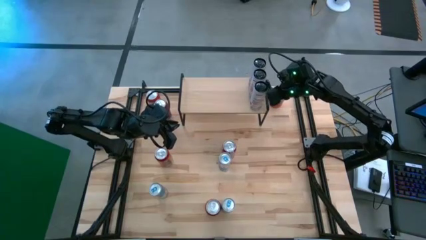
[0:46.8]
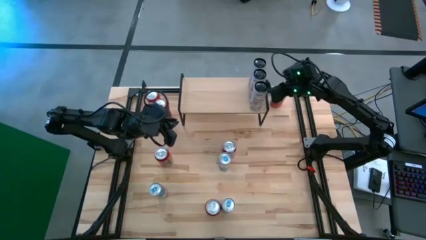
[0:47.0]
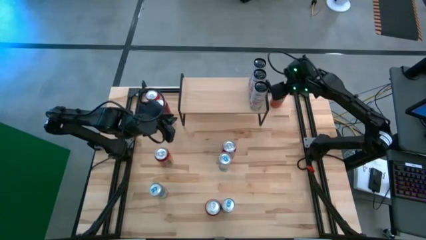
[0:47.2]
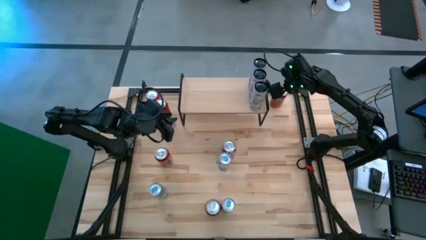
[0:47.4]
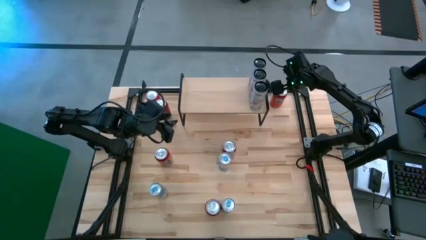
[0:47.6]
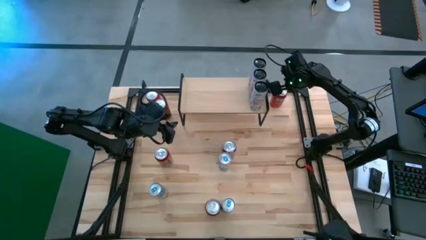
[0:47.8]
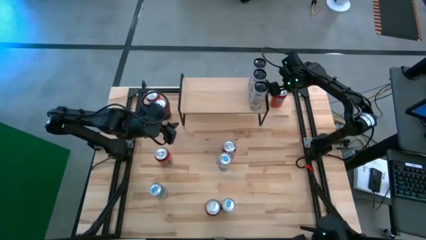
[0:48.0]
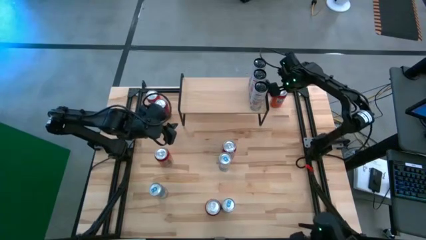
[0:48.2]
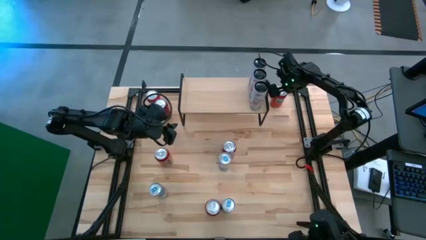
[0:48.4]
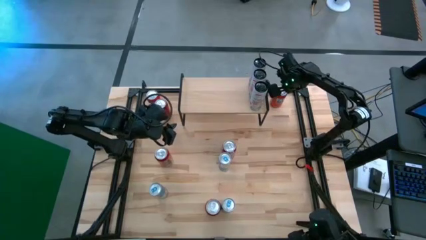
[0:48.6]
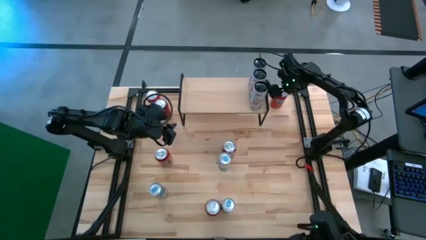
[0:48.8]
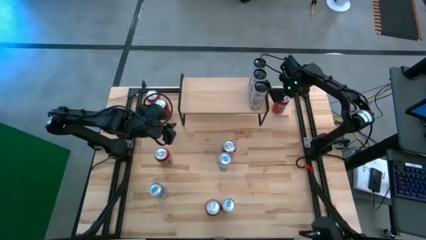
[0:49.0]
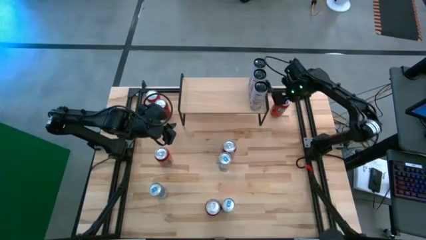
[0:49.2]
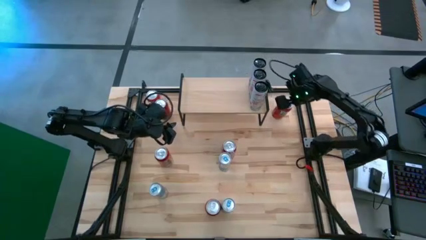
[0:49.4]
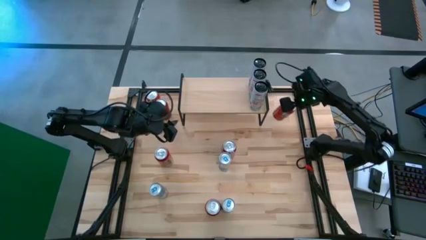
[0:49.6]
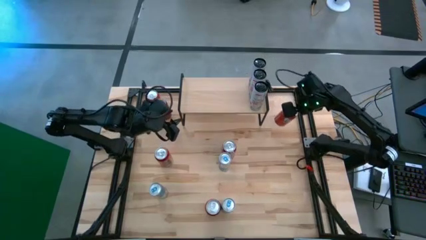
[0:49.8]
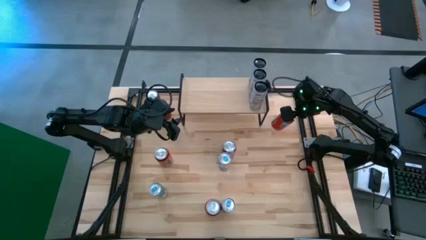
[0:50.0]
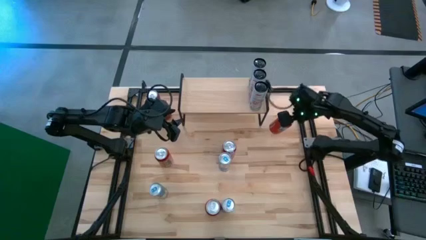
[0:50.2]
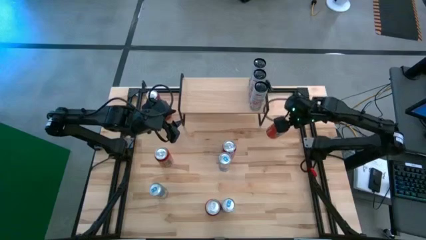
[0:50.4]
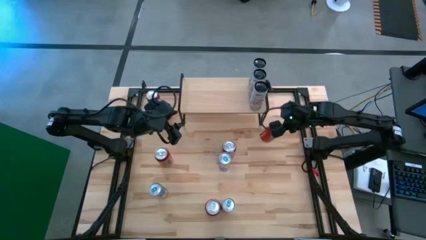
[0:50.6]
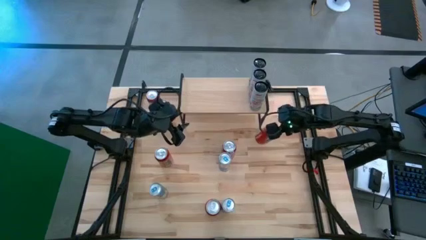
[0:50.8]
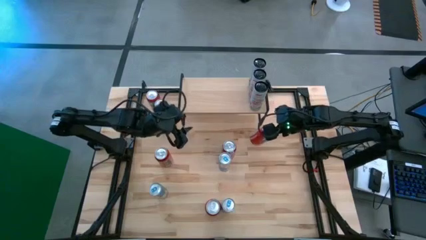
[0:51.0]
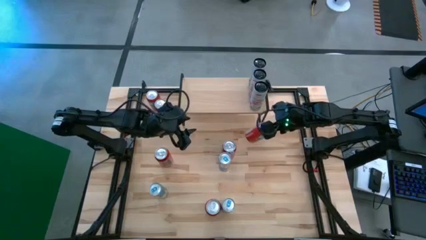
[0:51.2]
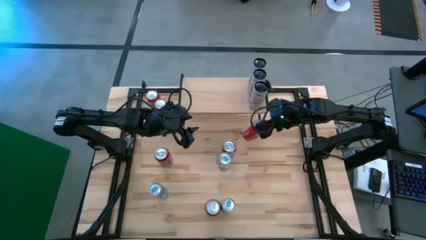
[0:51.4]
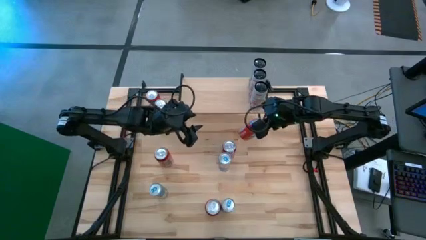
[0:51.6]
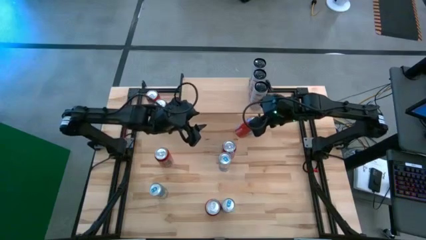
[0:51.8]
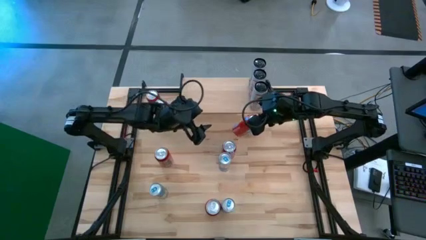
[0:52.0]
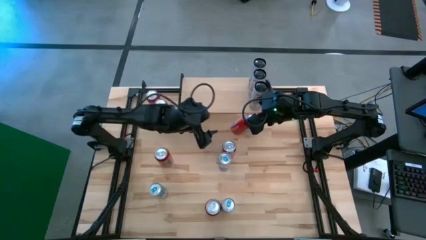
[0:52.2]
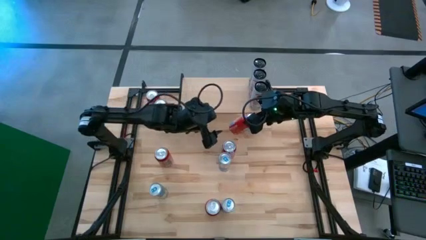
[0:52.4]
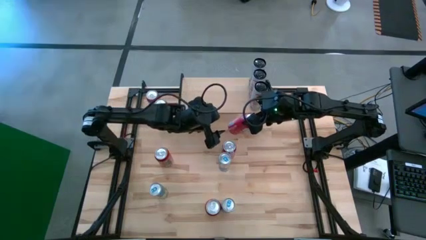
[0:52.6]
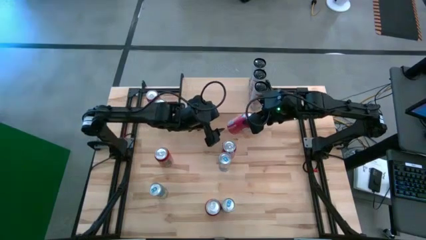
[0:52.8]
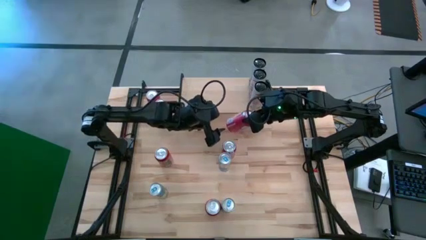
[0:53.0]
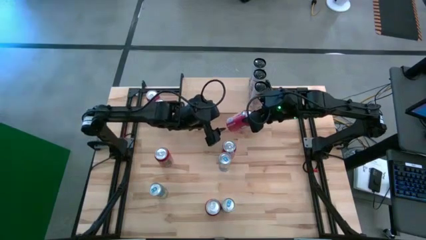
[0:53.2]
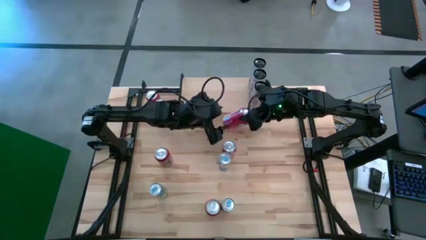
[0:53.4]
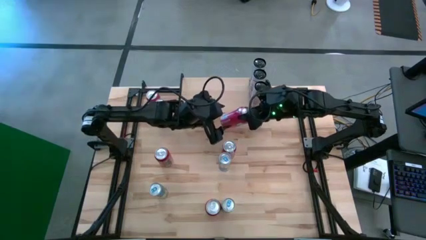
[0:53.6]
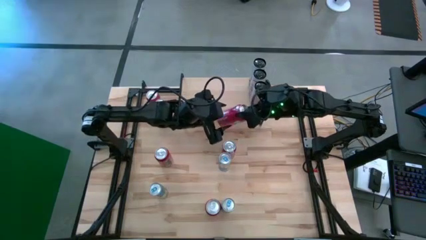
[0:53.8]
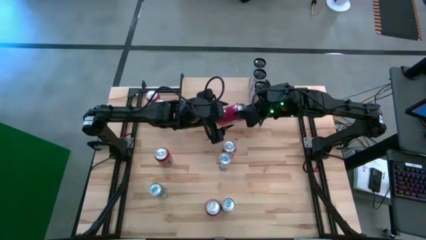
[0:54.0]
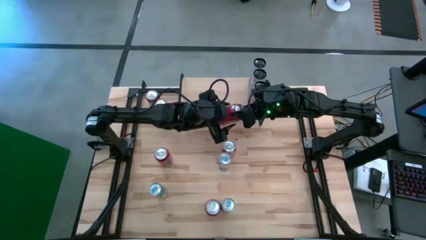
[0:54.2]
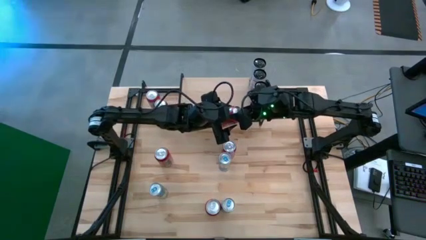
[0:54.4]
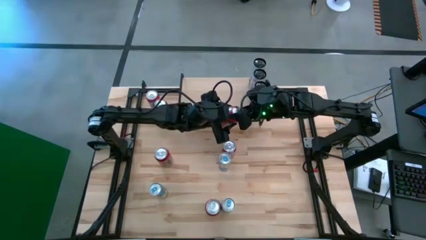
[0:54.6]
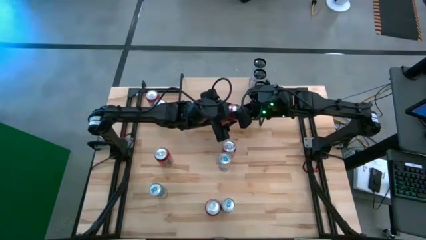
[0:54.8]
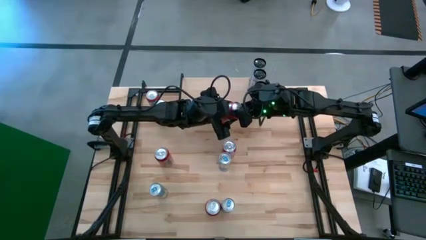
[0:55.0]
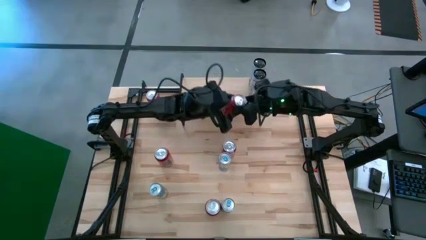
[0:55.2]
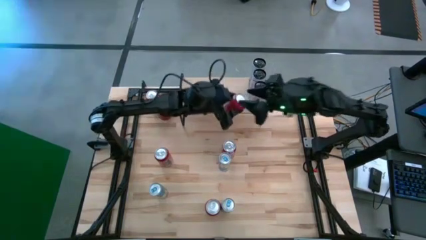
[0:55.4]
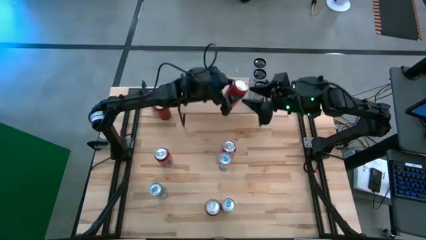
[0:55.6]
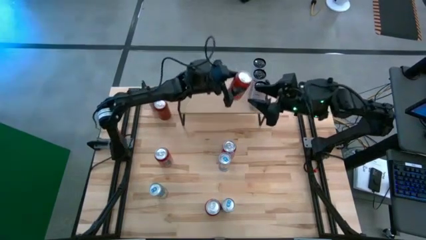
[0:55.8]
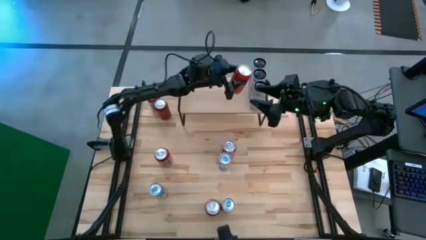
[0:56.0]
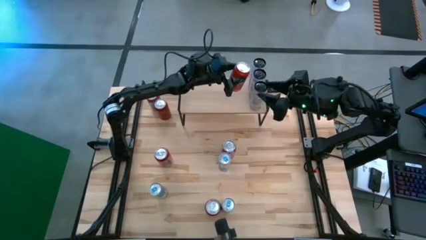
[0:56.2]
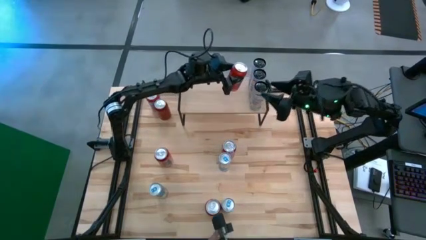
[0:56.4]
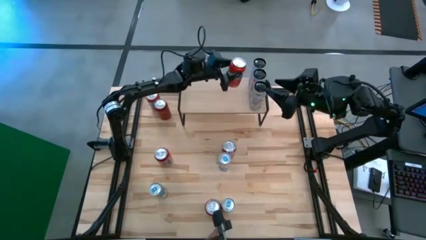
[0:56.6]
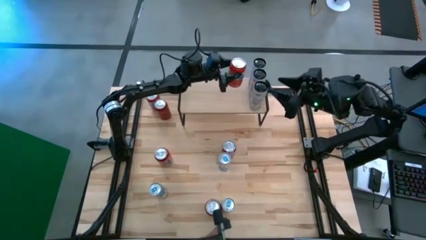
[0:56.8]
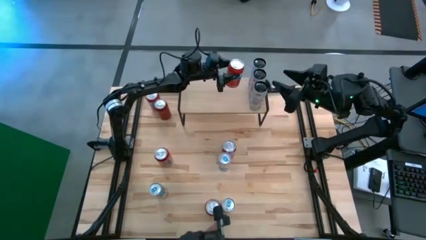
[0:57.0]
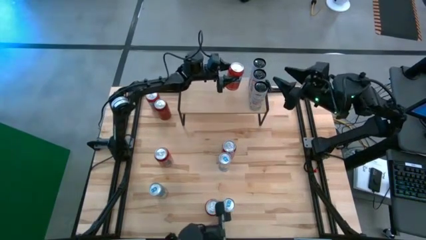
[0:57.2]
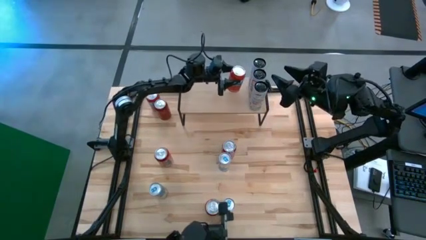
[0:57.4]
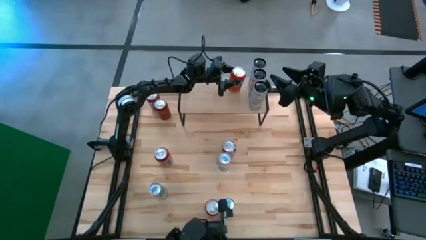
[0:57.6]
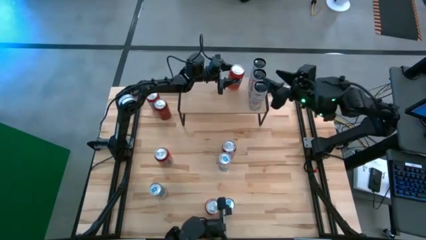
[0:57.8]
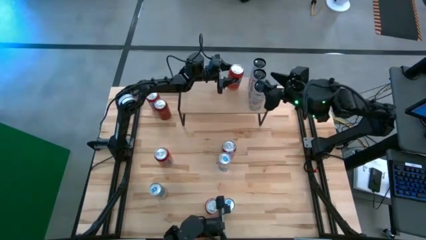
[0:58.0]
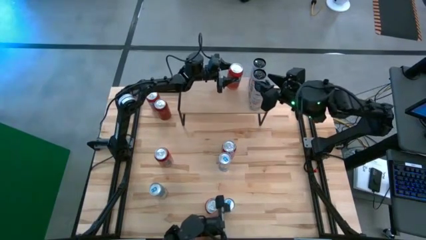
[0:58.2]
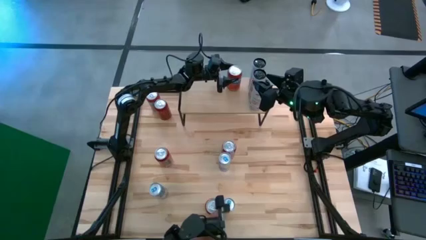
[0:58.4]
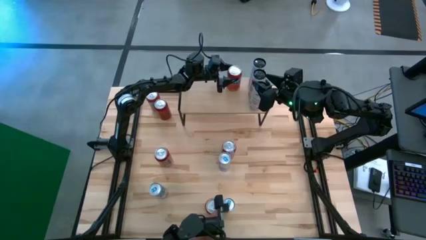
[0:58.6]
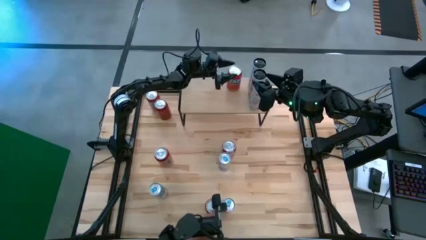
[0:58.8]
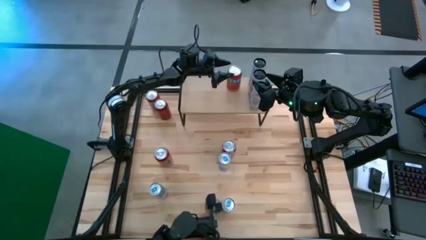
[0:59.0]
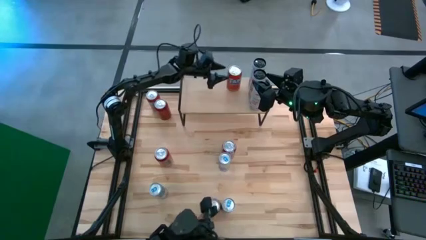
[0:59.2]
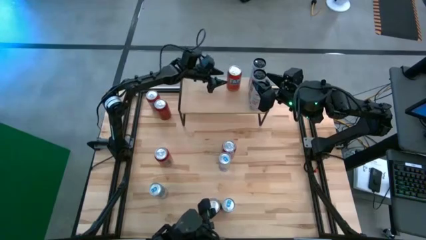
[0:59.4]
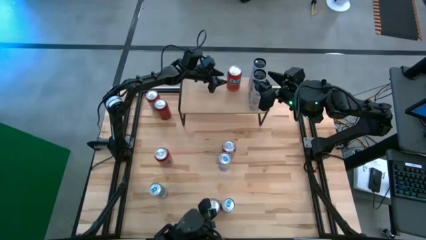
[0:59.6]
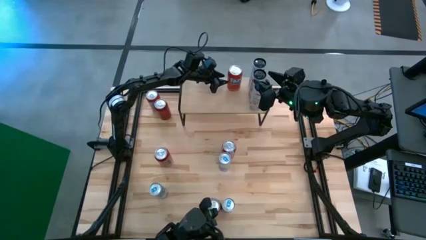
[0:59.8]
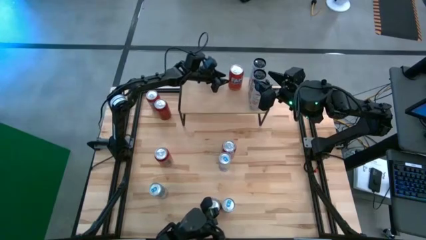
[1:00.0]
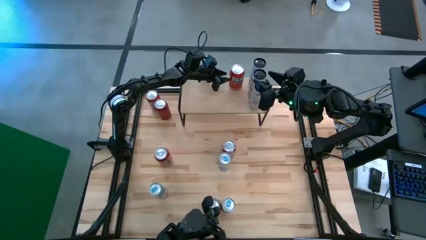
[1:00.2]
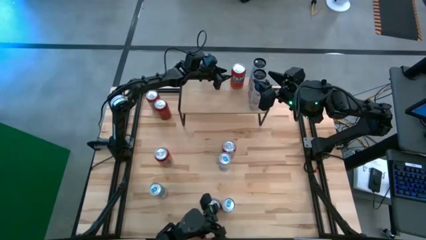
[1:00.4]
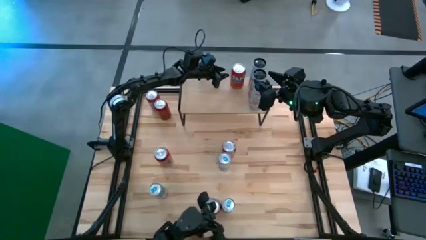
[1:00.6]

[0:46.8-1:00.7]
Task: Place canned beverage on shelf
Put the top right red soda can on the shelf
